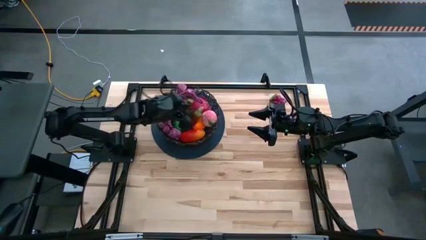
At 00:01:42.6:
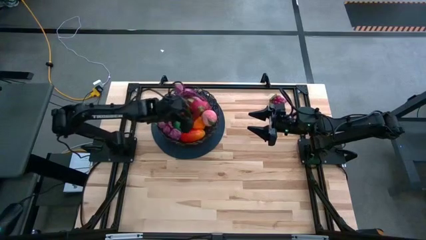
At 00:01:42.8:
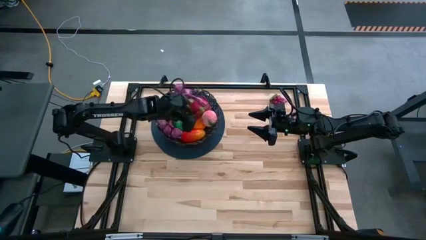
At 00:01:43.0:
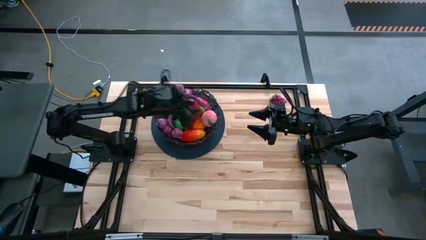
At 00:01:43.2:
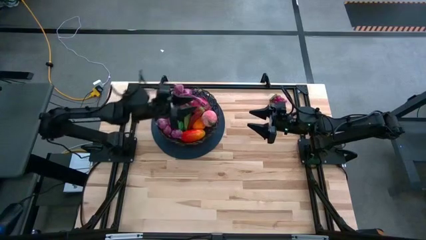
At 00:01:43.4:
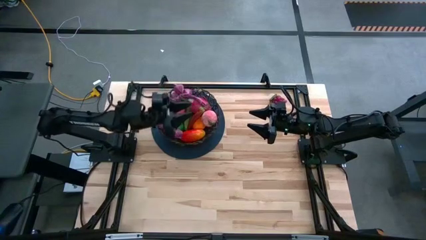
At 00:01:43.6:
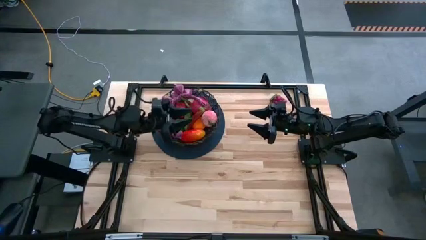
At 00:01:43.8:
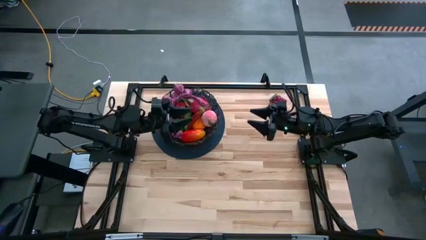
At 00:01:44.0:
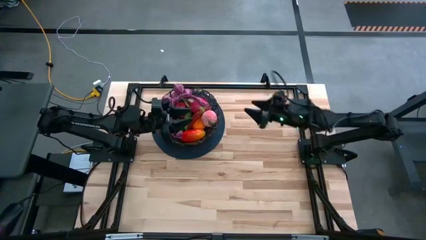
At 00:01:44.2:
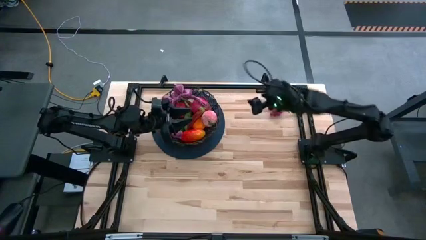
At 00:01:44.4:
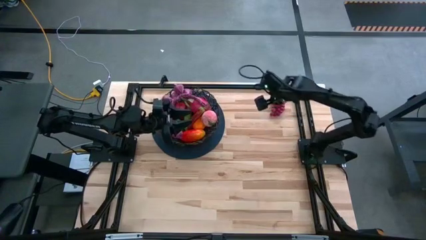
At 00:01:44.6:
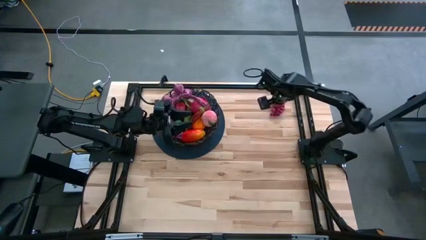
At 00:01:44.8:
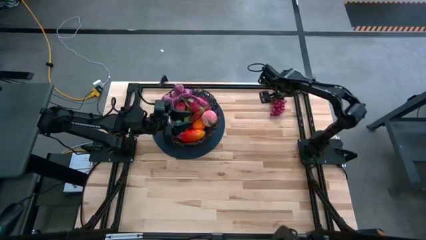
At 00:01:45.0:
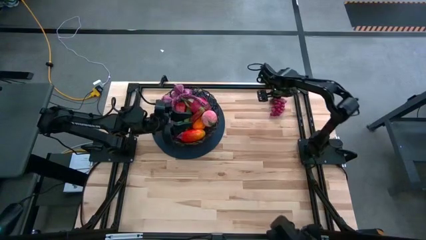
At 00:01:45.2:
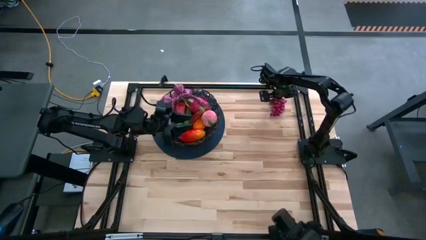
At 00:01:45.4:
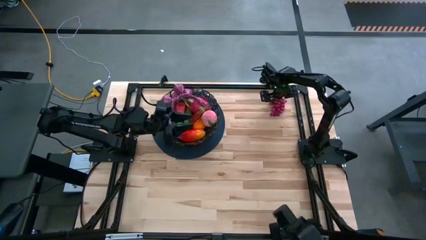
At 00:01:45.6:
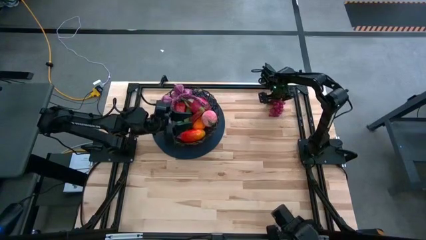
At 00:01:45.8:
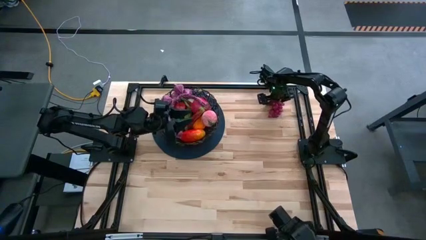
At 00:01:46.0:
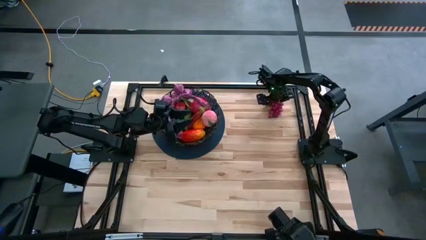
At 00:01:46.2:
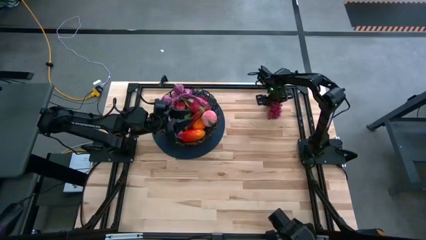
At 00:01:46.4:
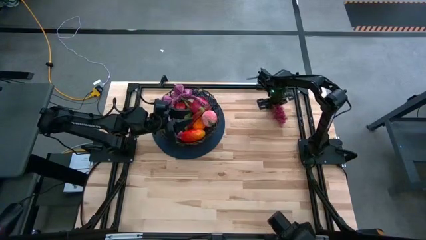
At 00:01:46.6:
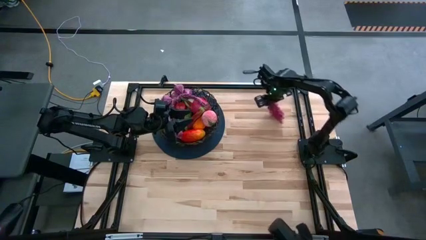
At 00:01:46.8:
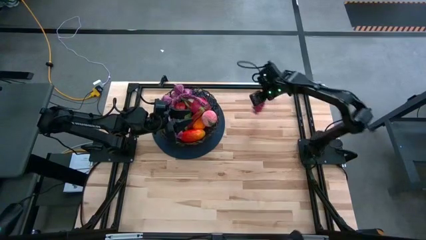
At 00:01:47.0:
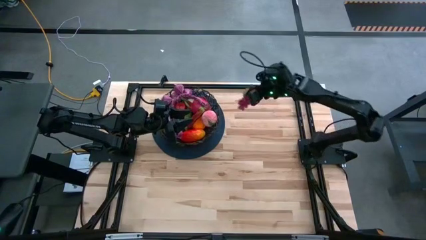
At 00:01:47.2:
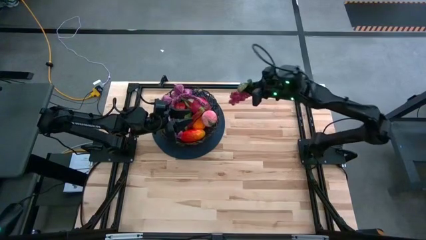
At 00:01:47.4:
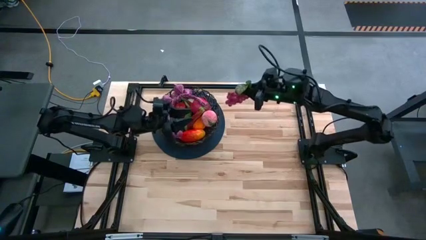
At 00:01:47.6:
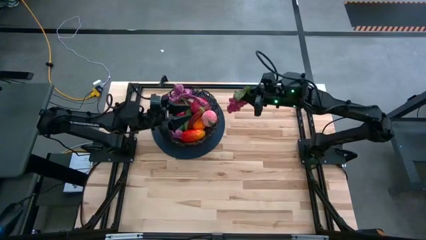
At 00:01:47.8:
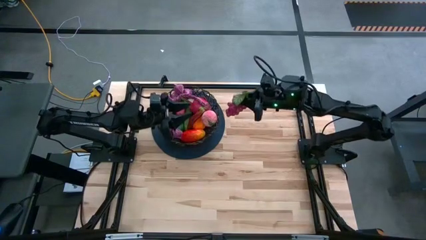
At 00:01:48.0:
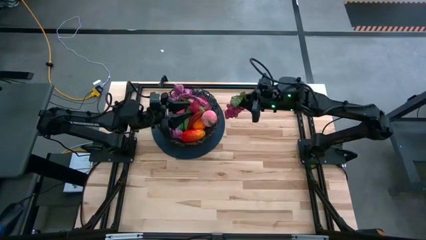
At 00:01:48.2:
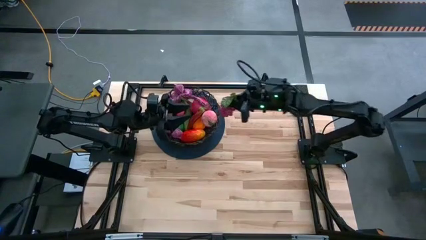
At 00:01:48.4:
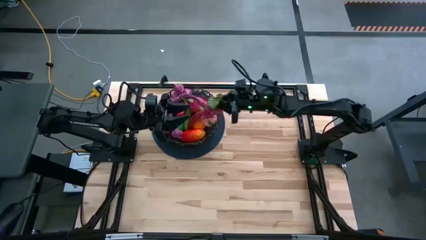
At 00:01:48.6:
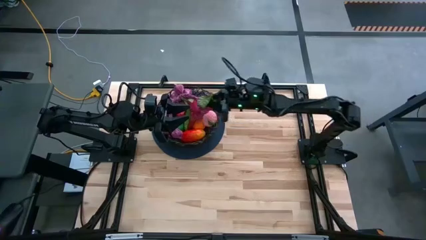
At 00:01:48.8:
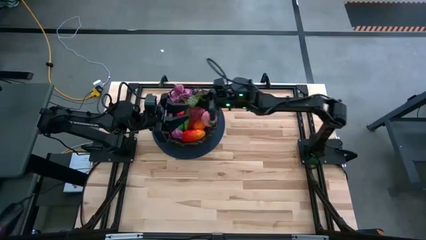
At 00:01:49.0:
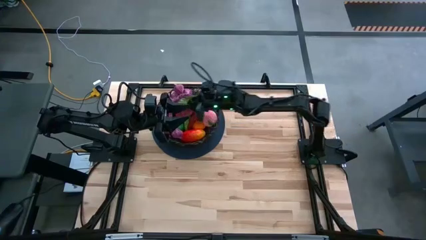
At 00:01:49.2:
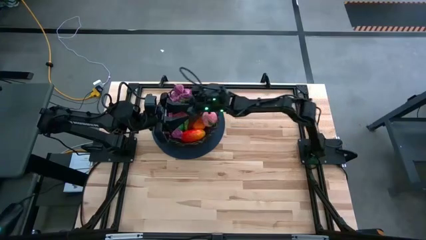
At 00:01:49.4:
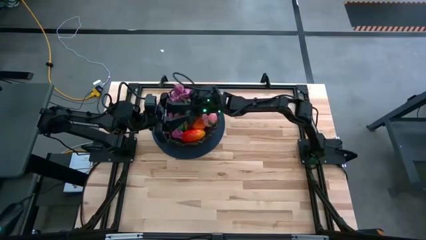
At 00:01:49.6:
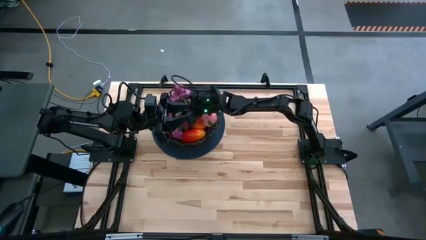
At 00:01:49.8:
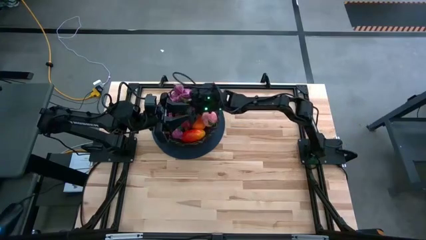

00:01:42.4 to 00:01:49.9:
Task: Build produce basket
Put the red grapes into the black wire basket

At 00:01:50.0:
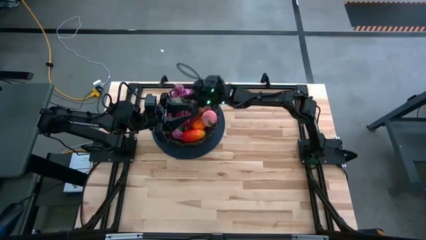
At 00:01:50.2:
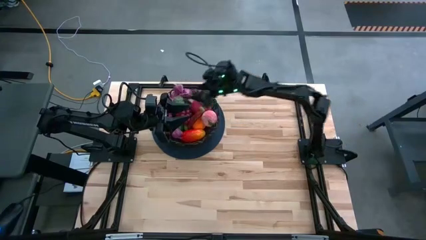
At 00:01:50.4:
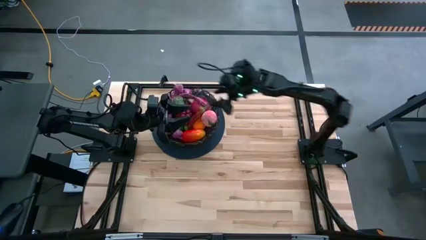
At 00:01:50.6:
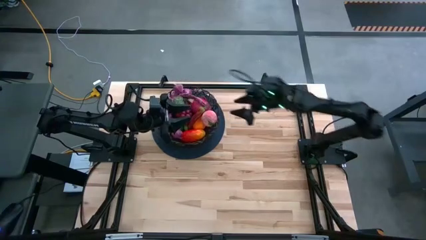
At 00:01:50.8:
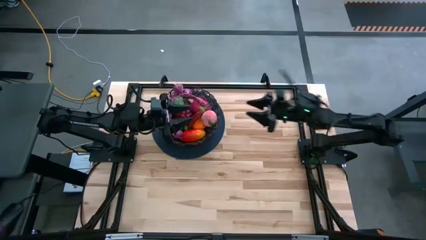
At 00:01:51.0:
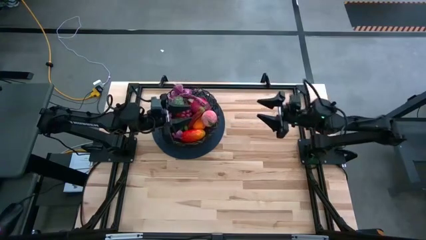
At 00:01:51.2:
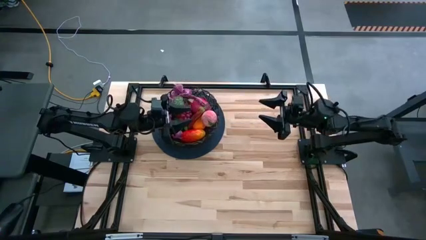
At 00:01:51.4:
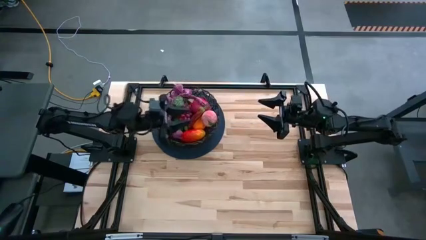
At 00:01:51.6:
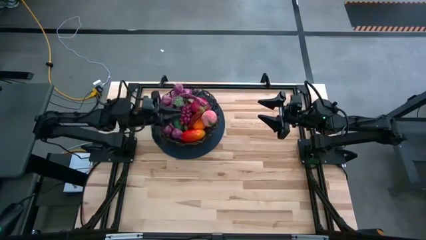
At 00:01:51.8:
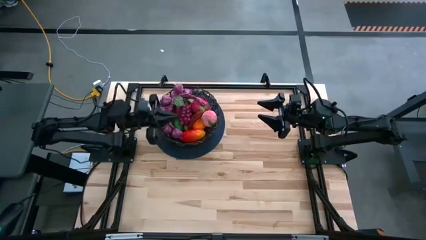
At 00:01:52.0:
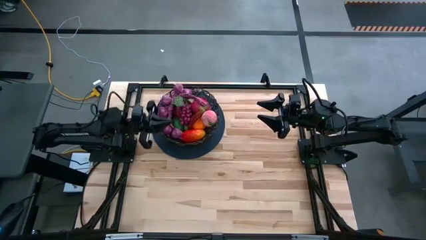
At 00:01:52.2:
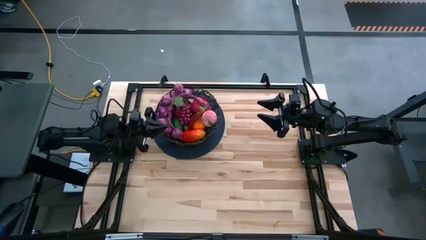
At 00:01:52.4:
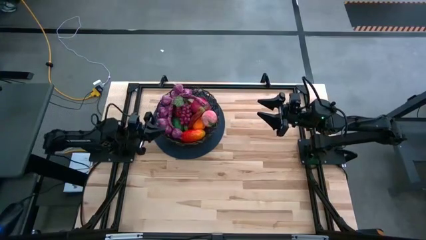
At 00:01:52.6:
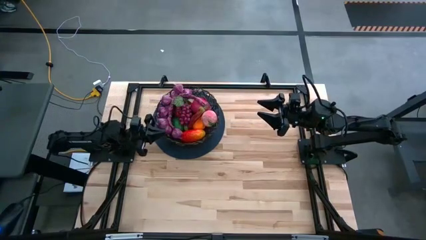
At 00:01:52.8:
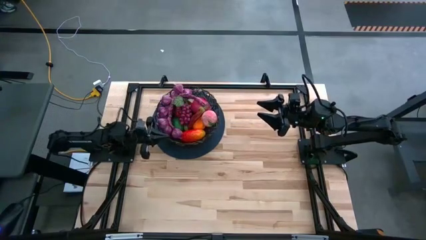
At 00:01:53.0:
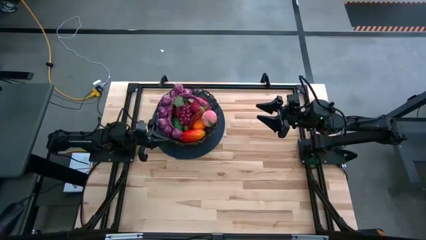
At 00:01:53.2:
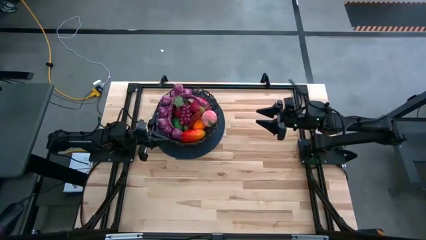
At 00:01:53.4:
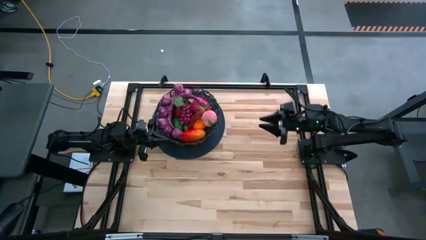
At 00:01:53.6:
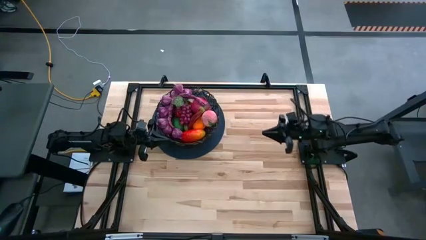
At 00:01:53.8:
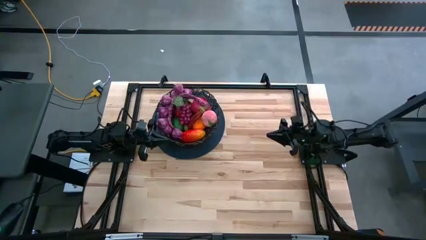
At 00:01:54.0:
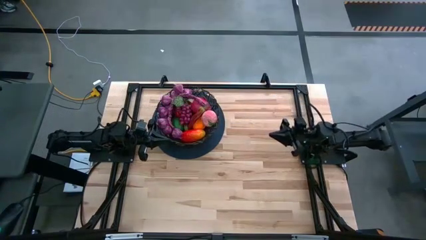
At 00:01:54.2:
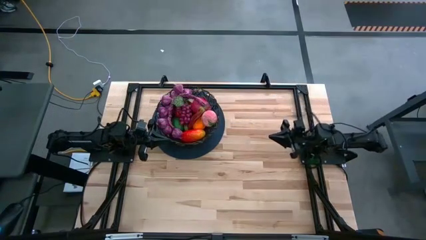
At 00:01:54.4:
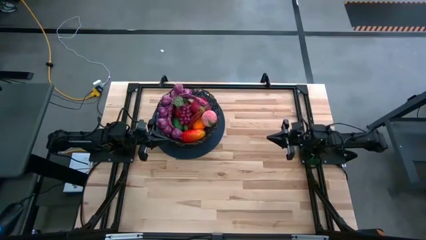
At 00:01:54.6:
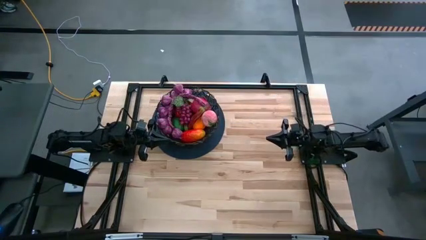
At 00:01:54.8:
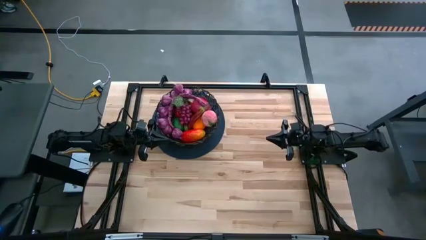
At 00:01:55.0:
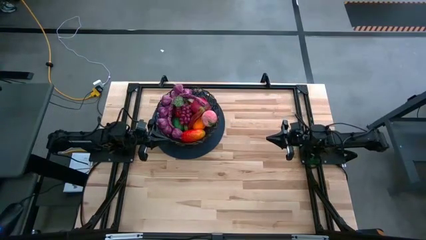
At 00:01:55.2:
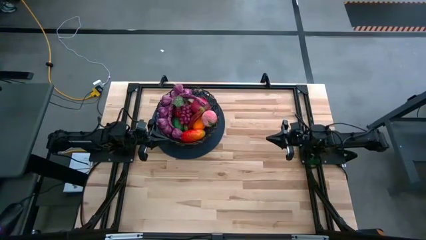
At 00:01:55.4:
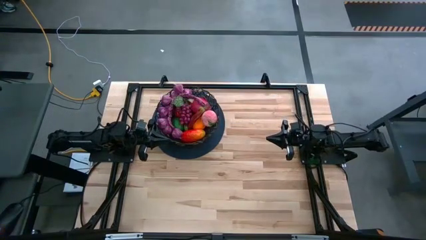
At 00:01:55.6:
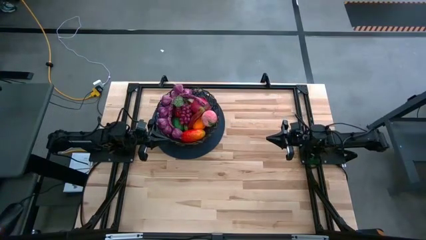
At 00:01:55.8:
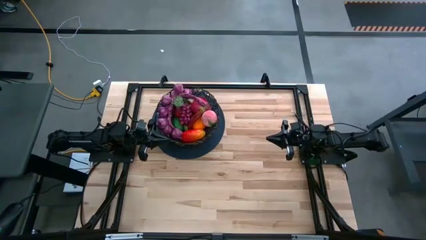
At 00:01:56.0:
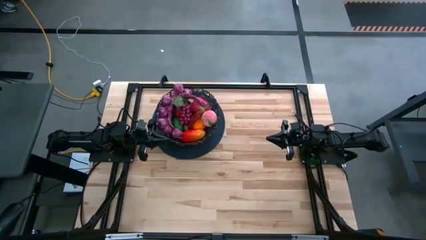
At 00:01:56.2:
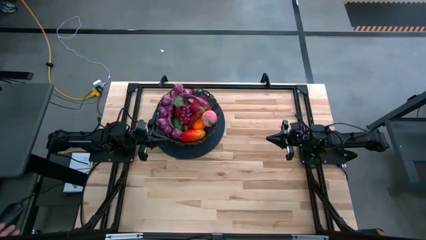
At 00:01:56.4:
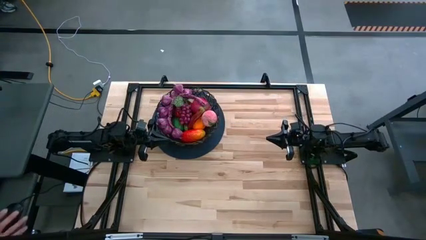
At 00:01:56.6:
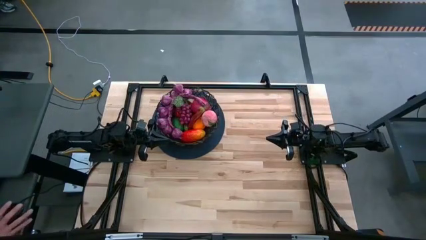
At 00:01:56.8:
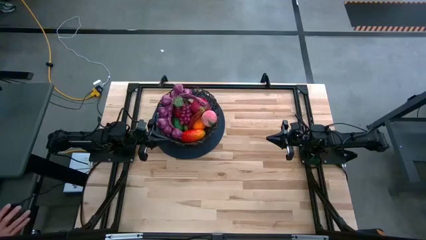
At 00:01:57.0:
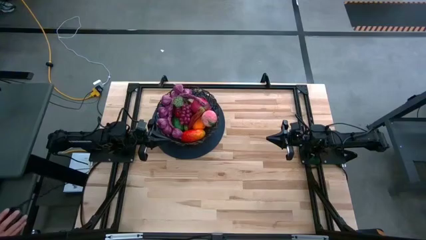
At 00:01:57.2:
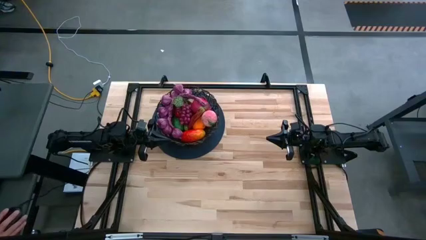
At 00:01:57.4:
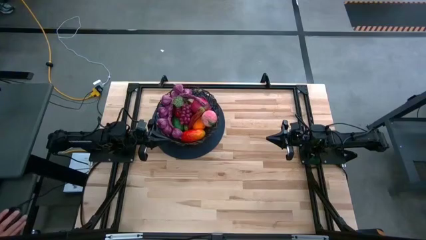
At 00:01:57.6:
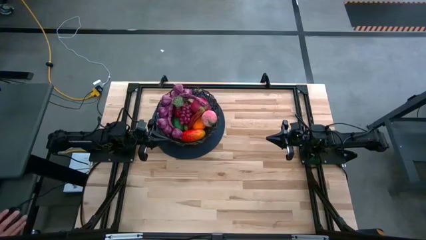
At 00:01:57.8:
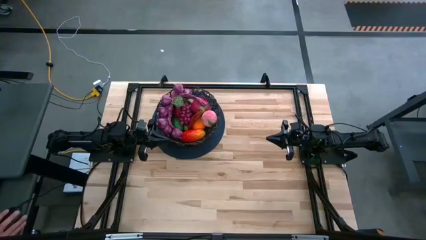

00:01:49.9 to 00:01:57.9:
Return to Home Position
